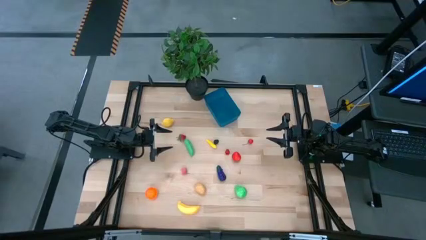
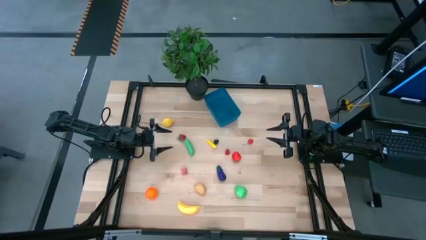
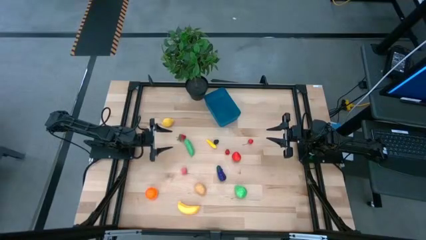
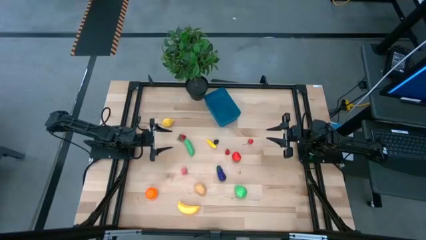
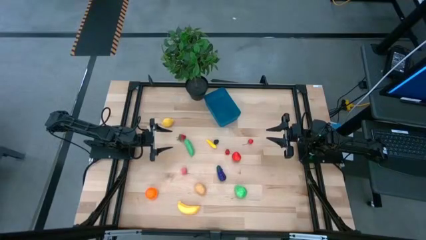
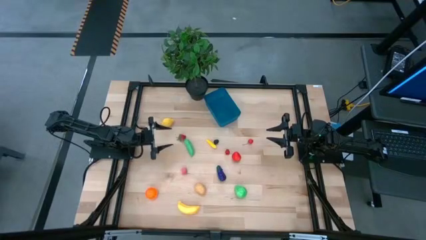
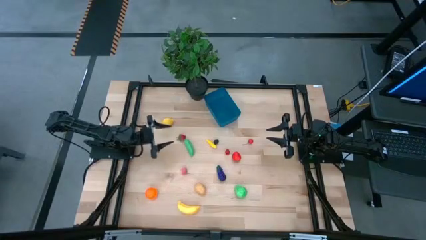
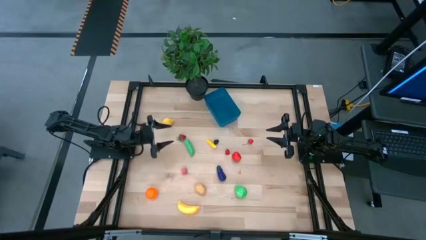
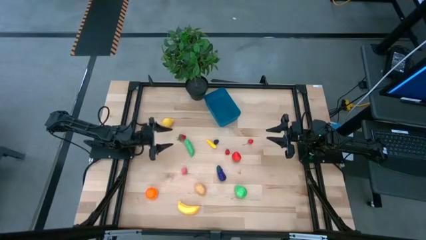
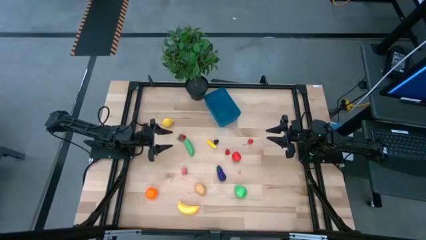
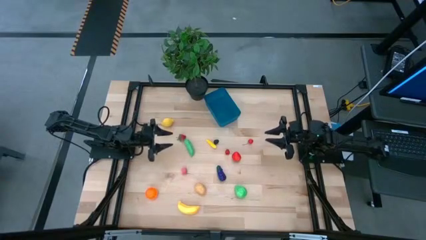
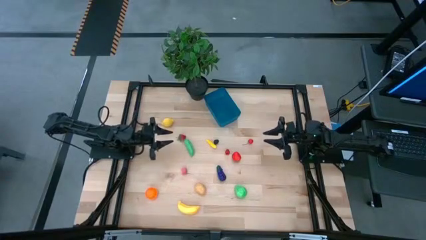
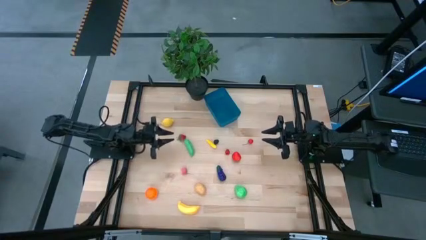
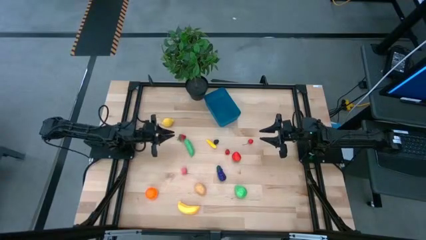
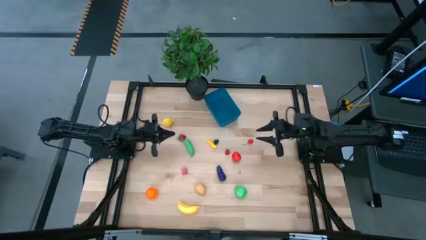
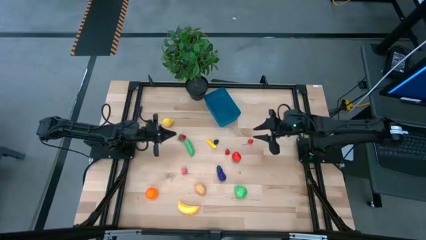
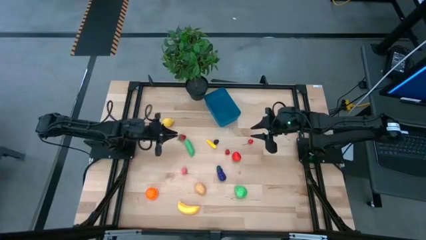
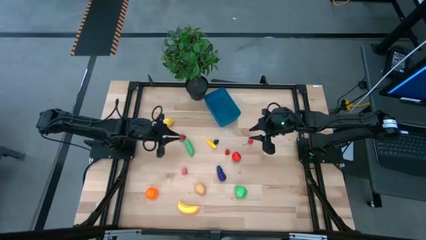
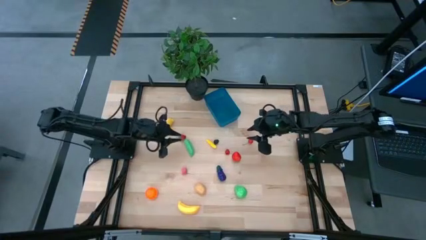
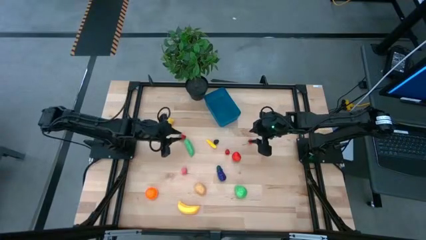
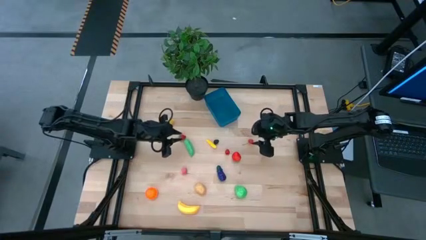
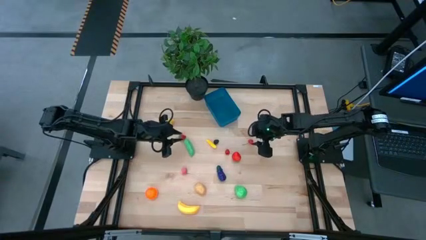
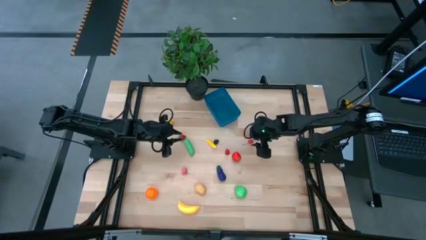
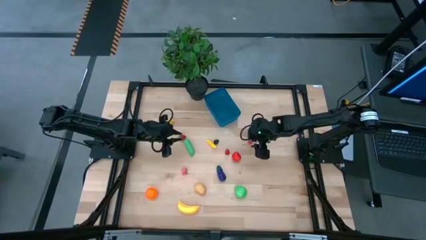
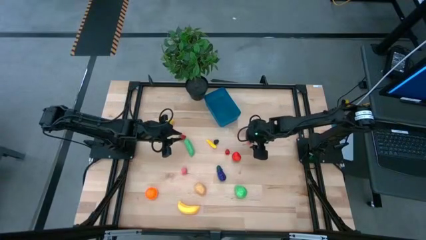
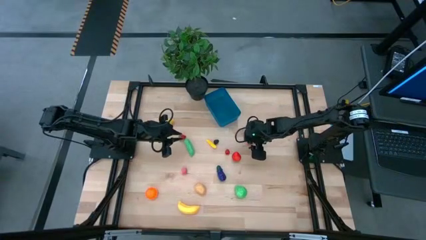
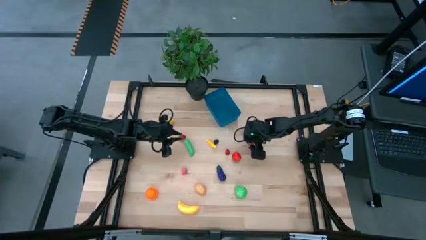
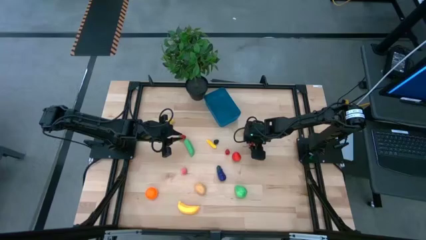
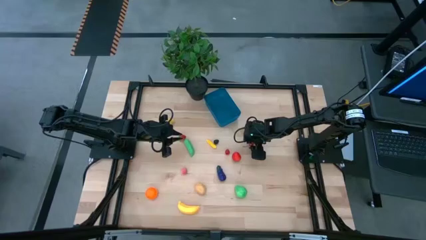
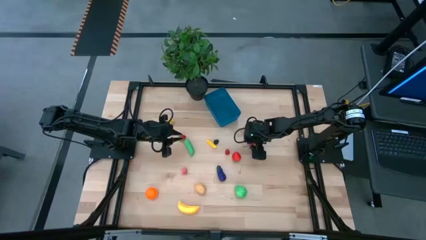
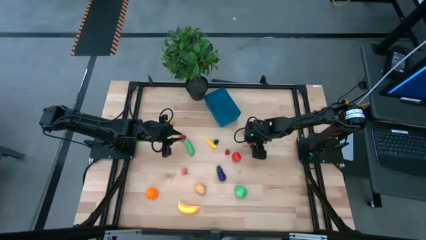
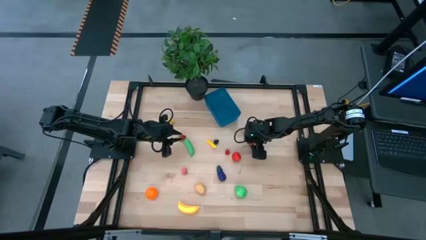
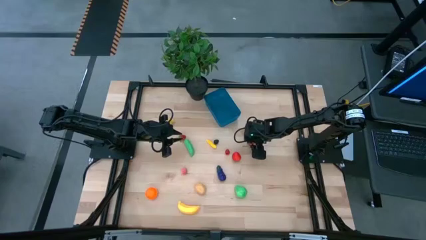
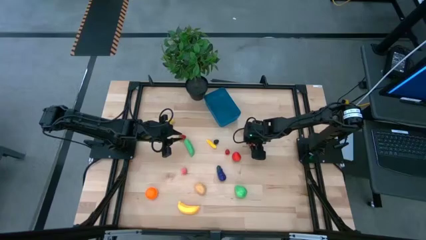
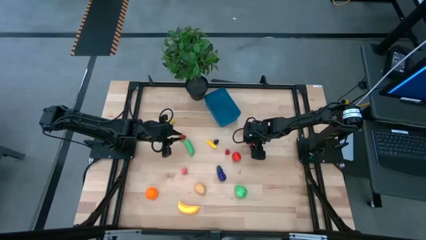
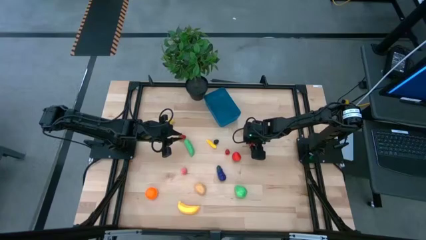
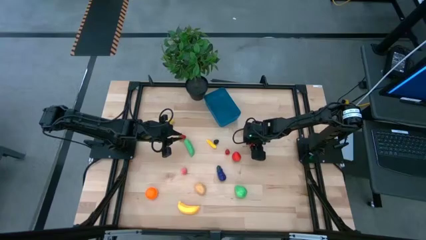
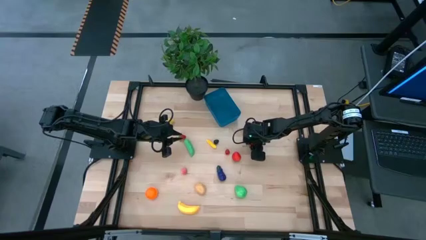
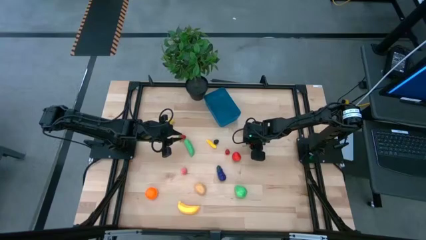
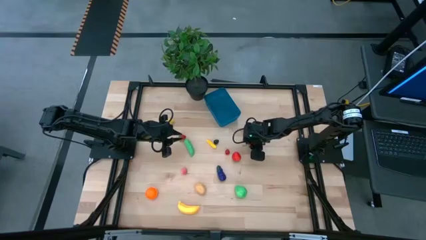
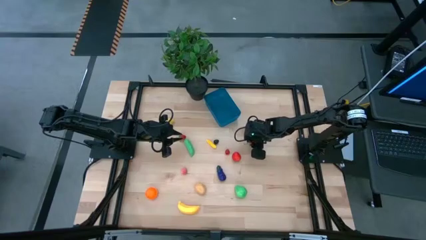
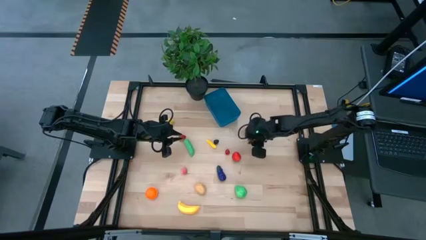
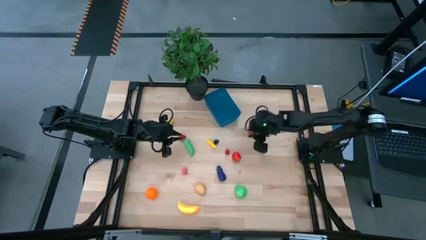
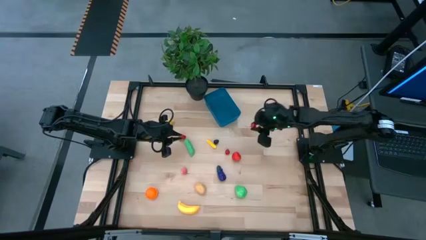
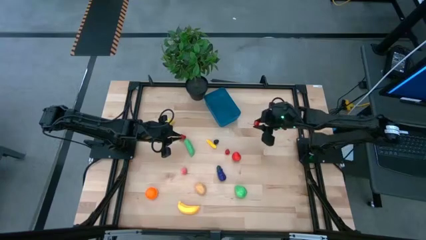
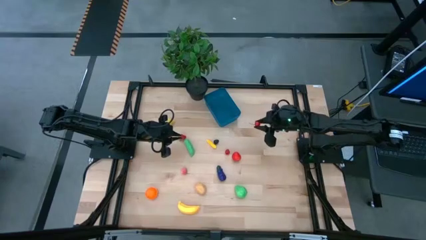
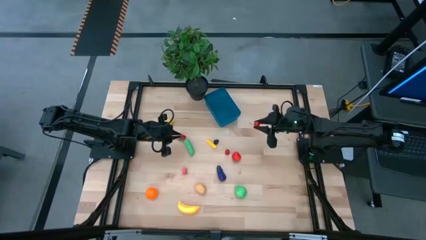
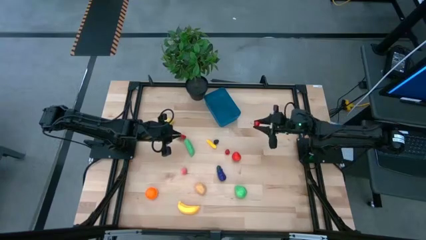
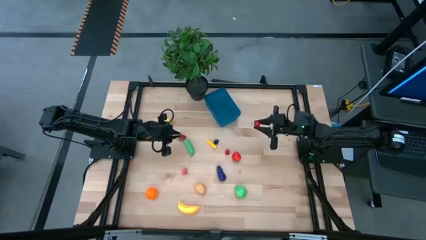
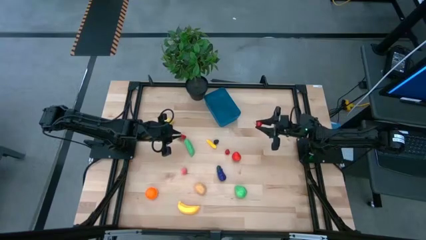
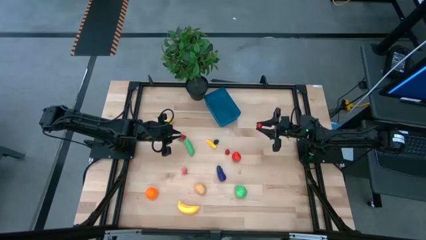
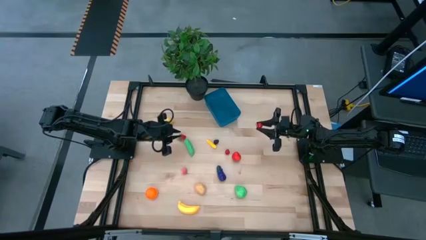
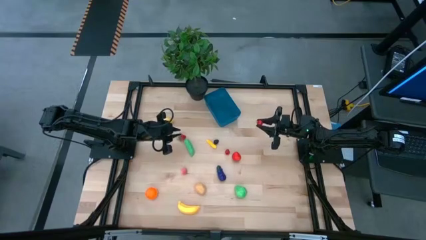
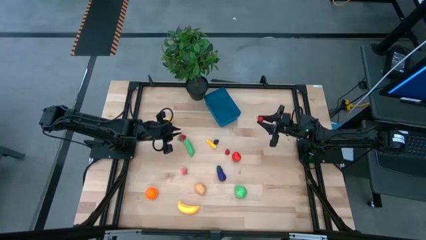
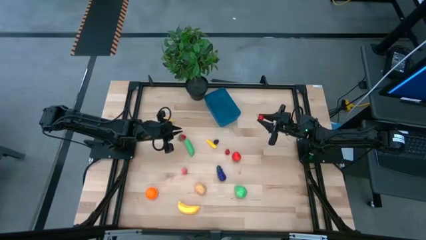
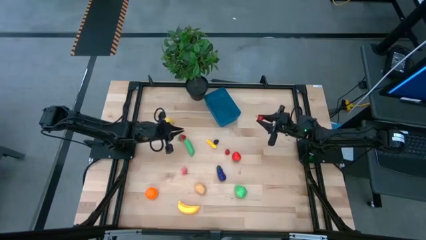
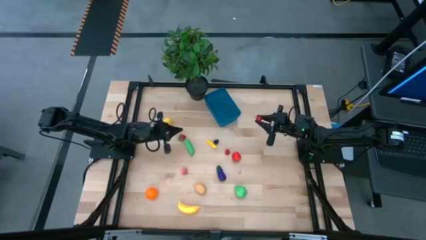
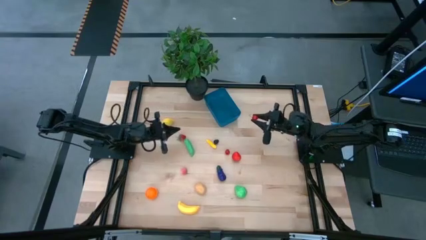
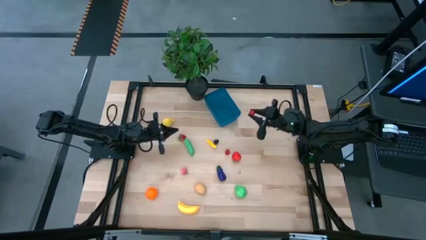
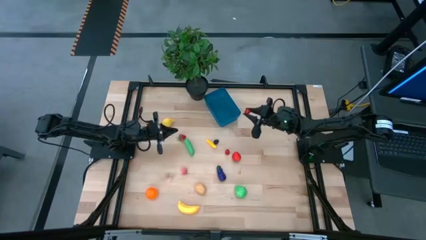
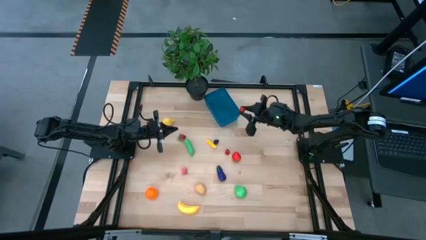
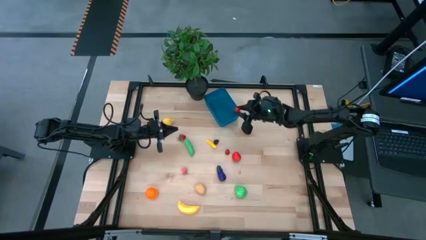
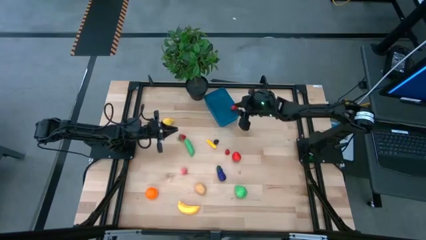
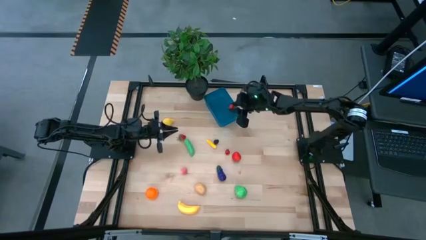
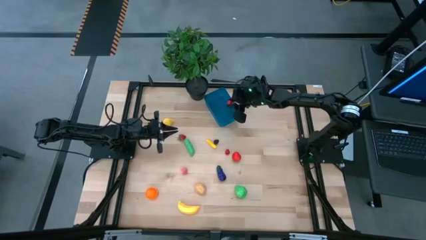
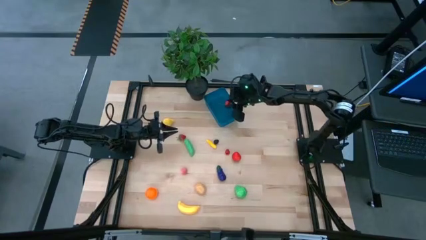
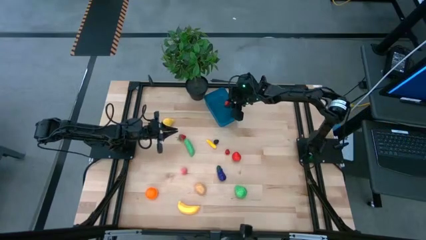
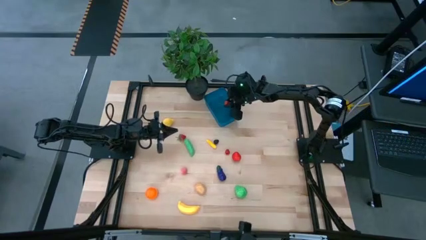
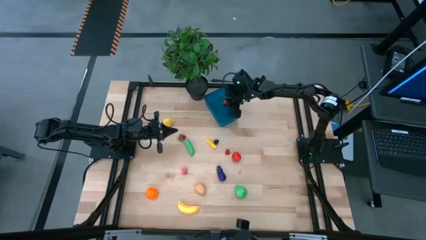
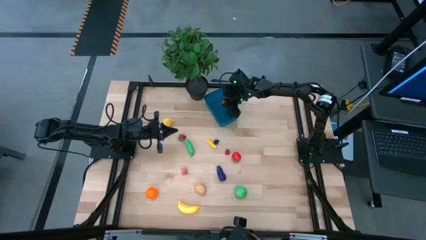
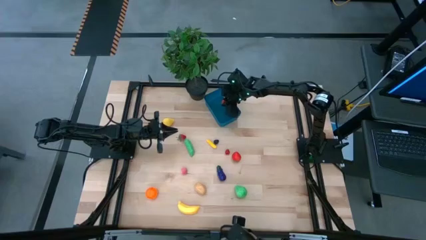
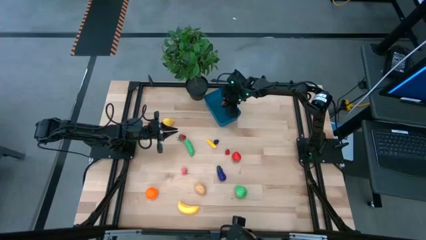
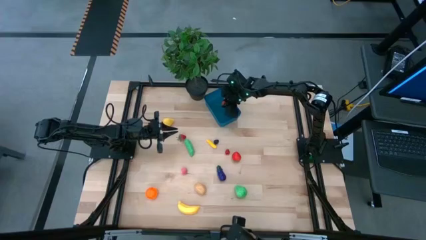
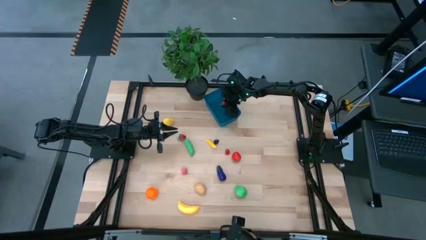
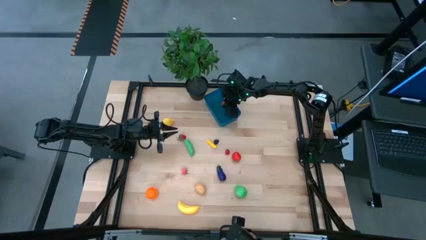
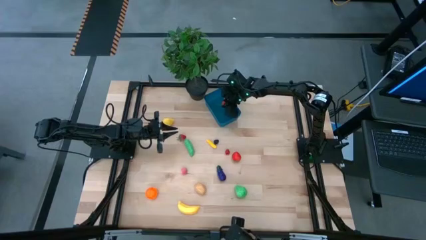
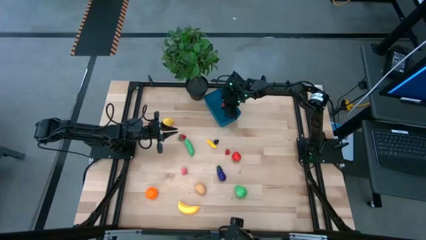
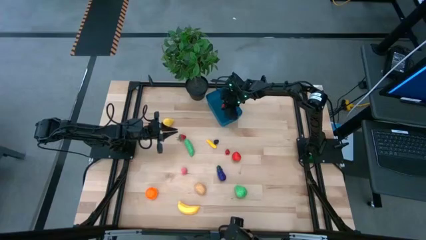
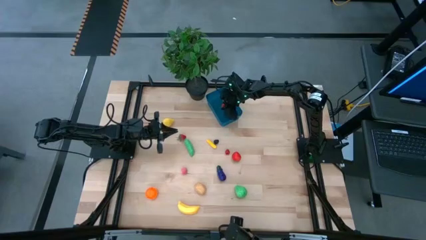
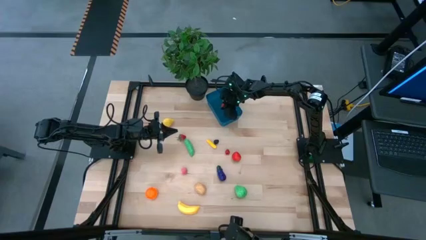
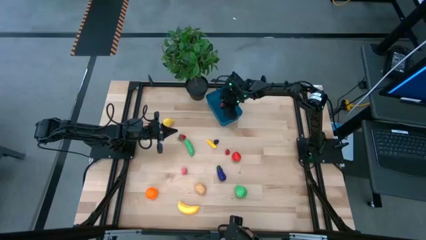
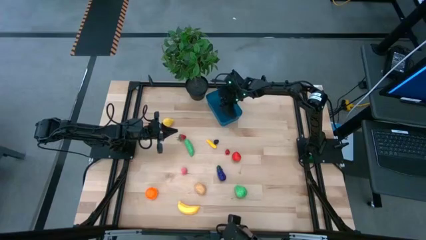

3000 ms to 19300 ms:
Task: Pick and placing Produce into tupperware
Put the cherry into blue bin
